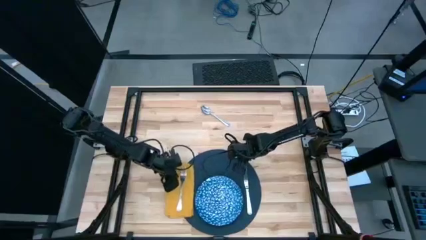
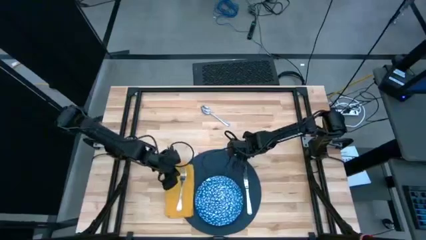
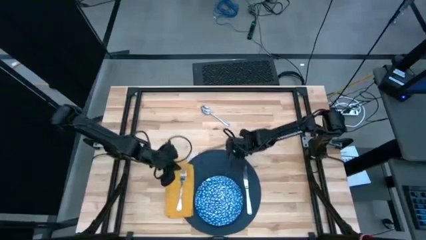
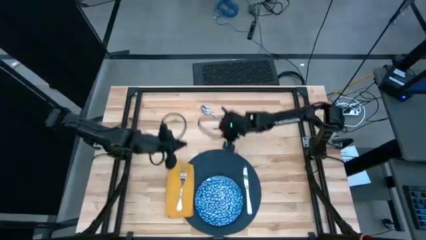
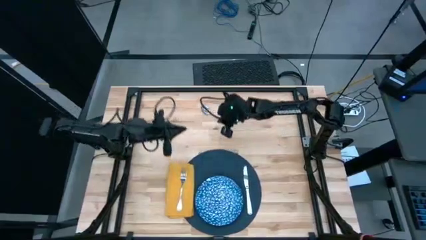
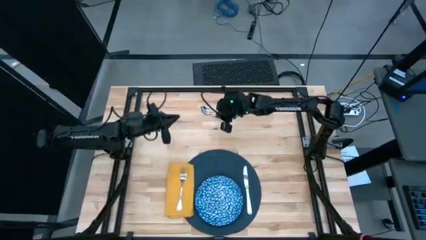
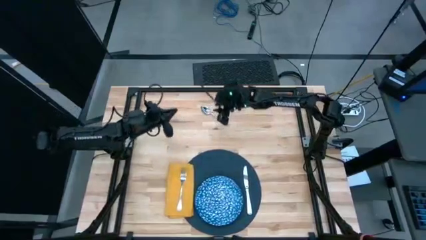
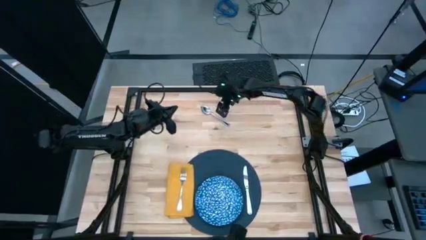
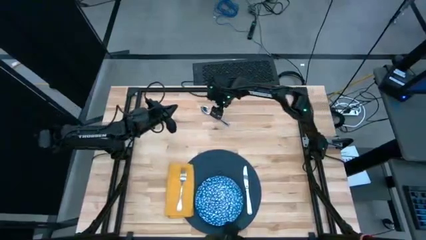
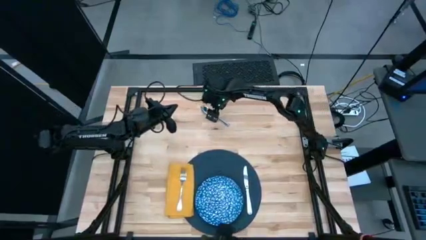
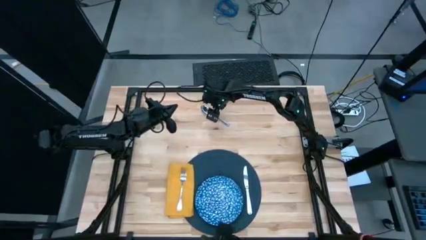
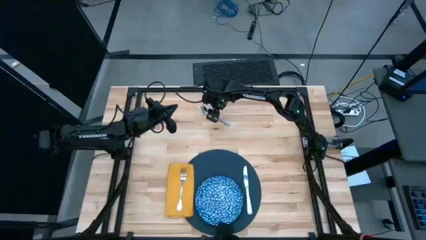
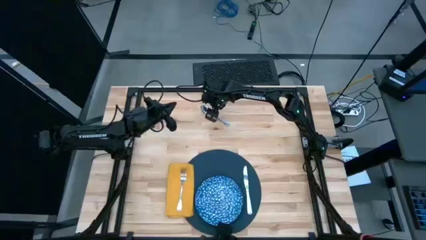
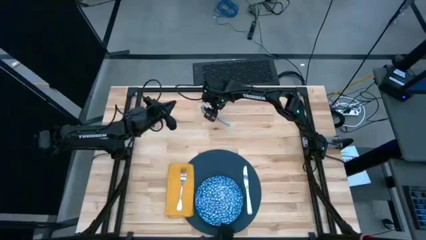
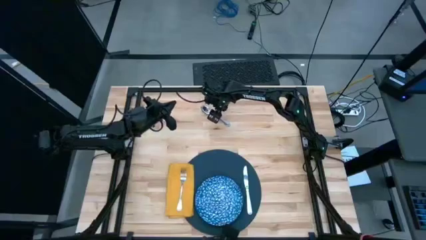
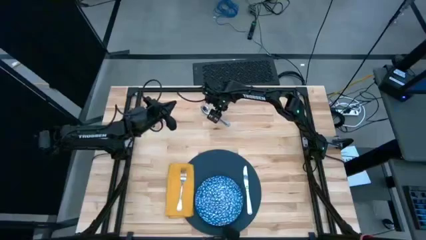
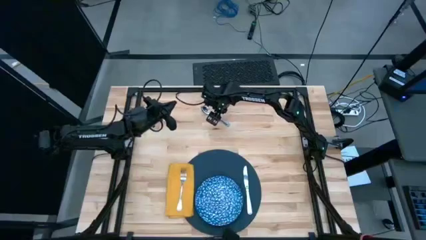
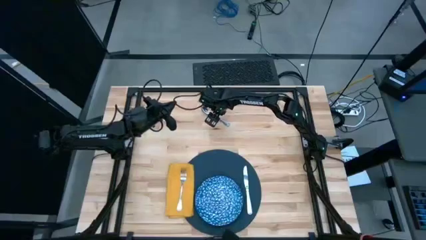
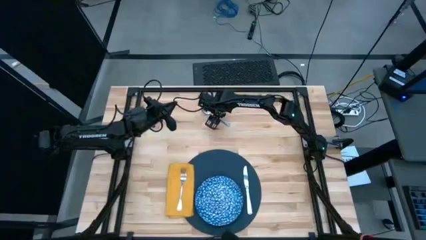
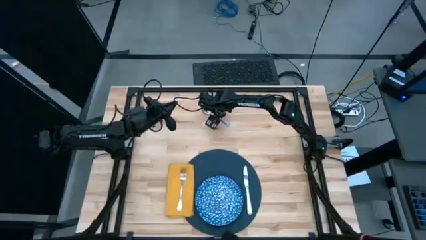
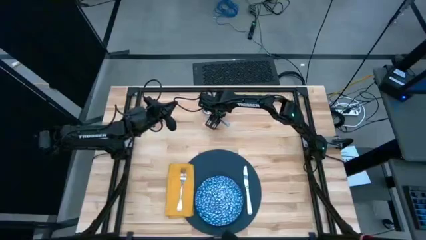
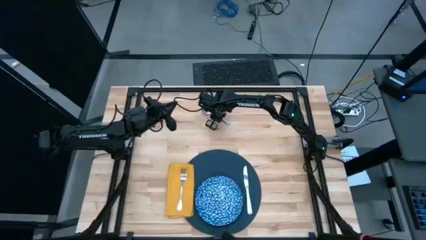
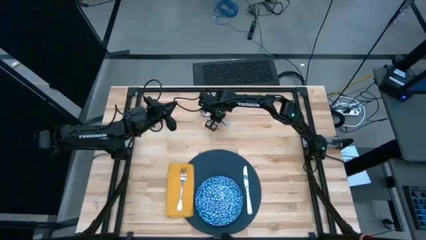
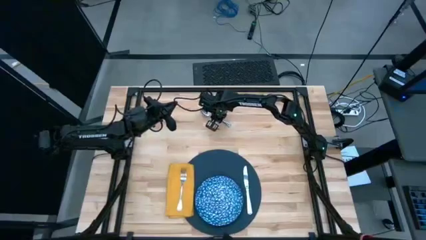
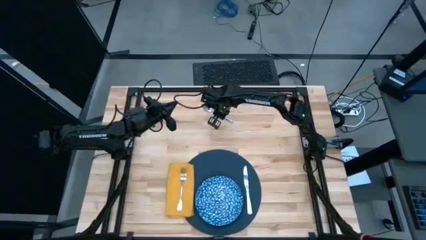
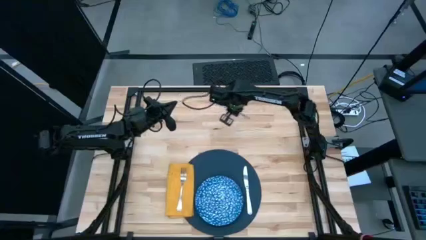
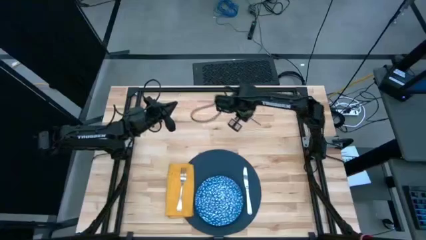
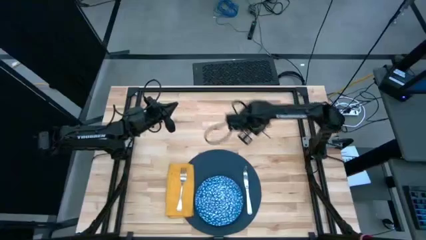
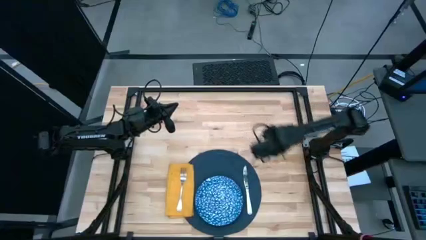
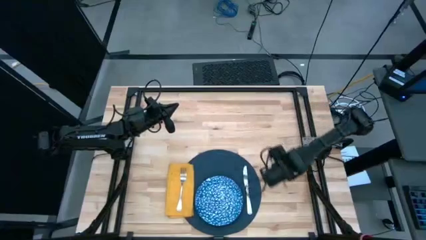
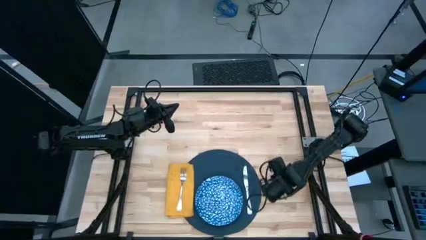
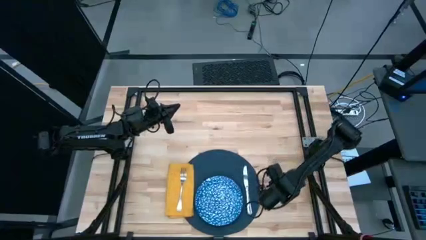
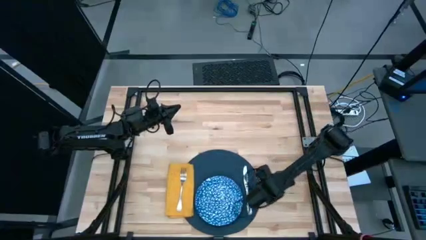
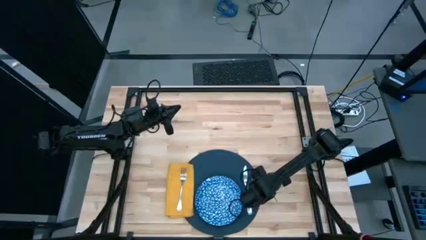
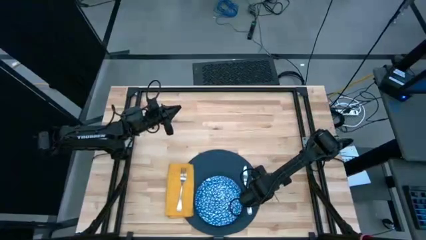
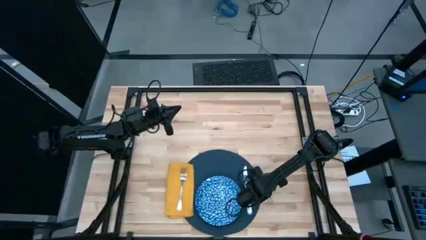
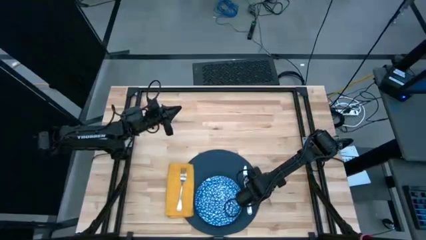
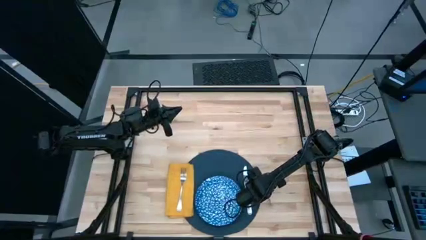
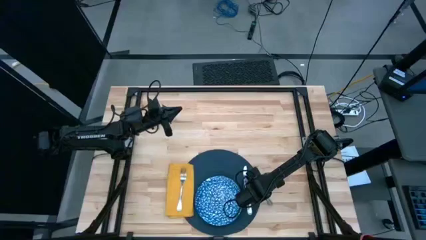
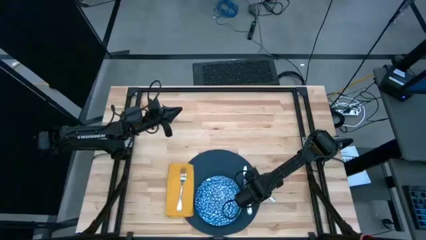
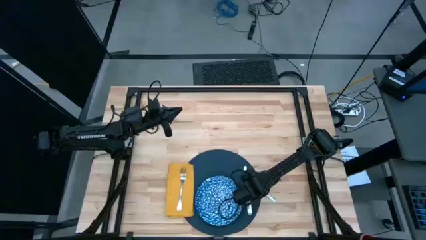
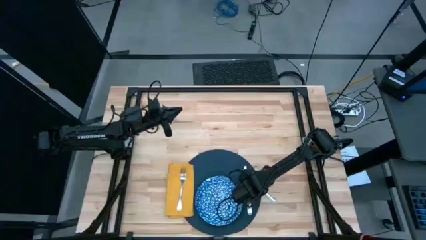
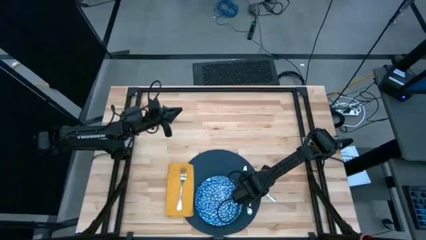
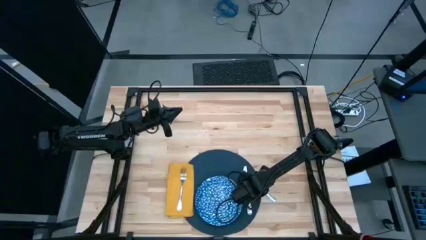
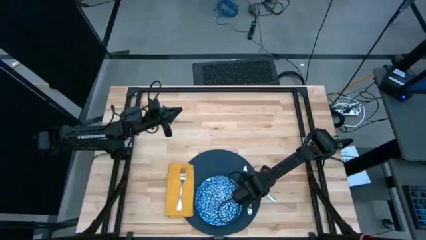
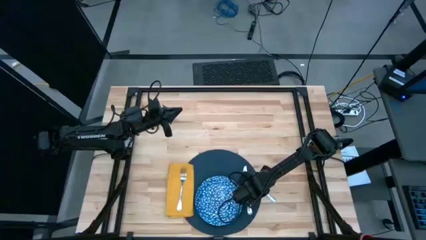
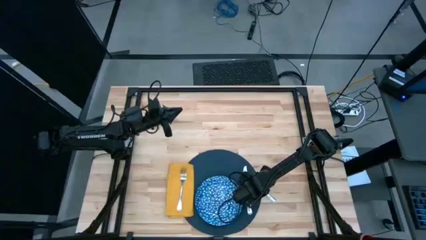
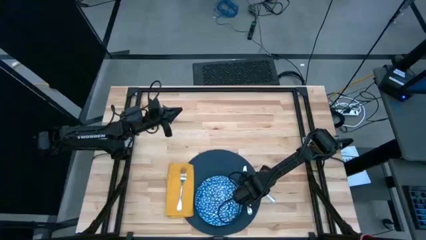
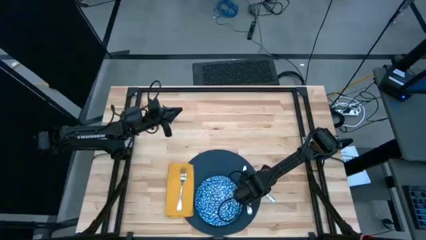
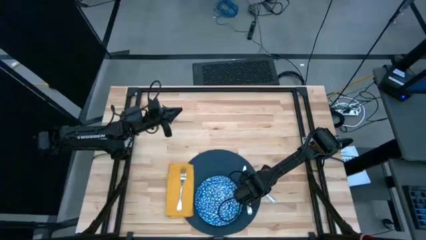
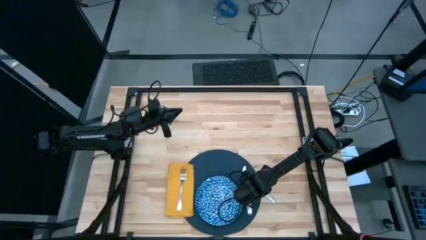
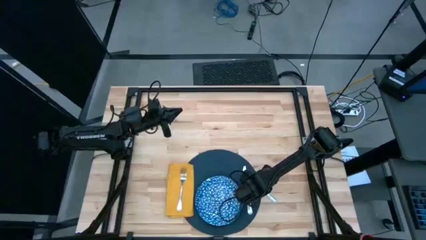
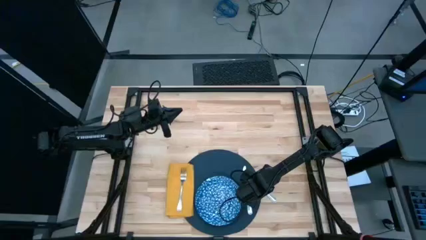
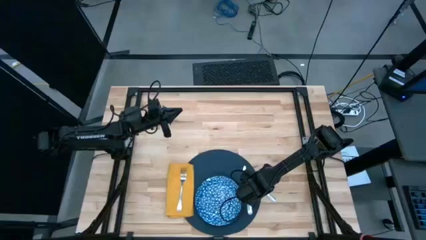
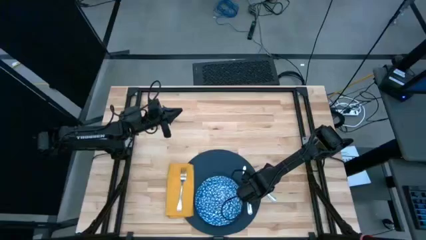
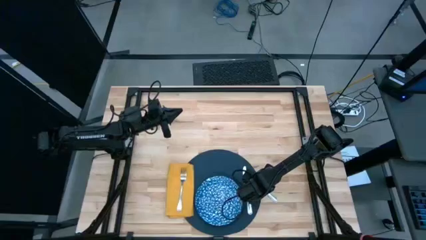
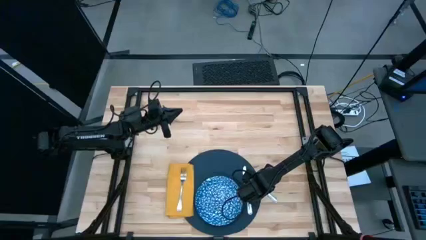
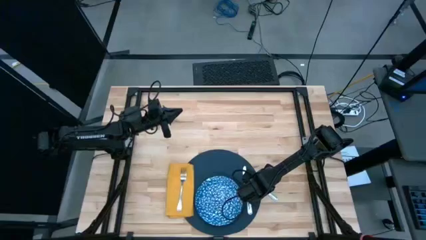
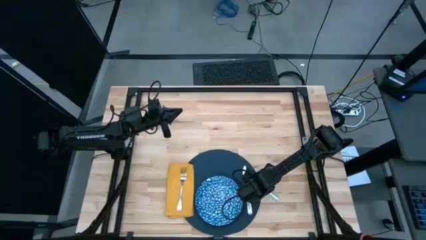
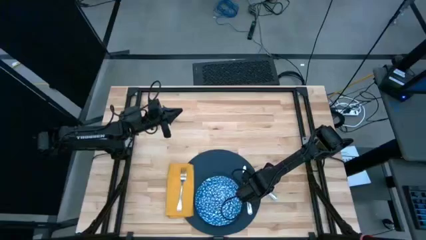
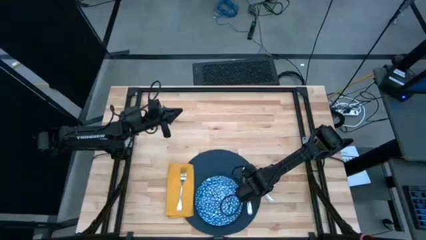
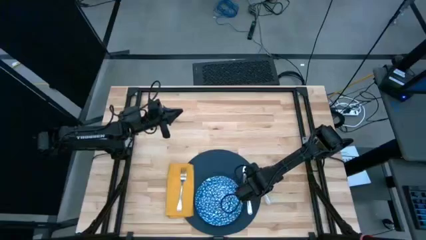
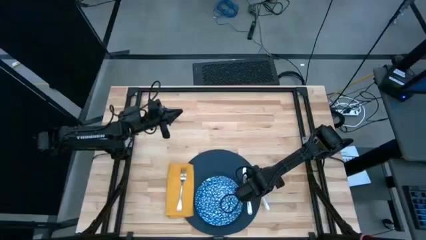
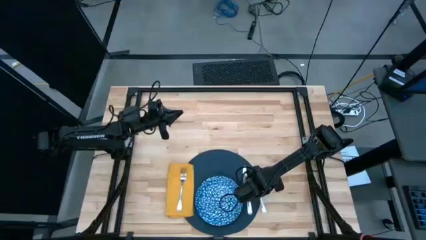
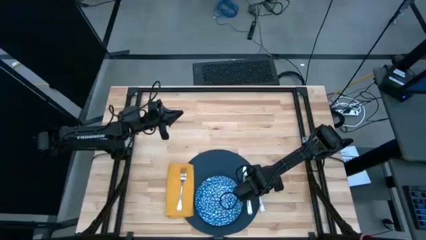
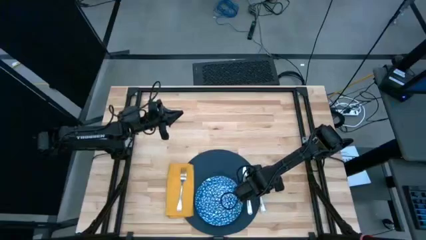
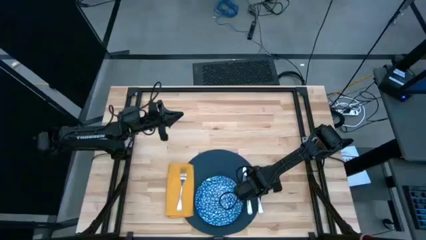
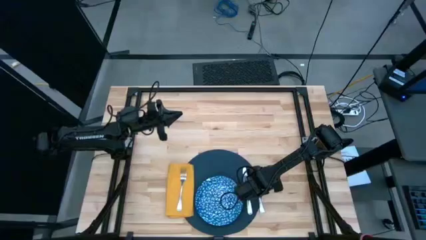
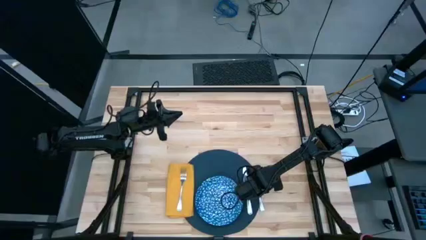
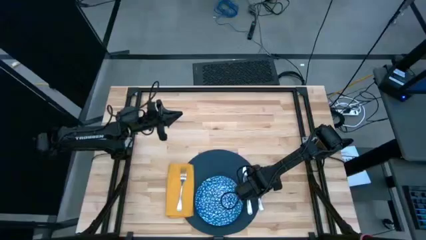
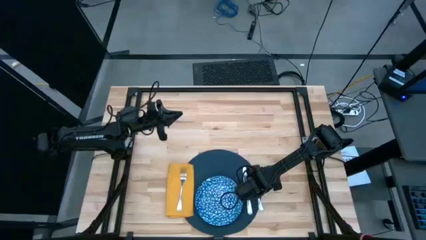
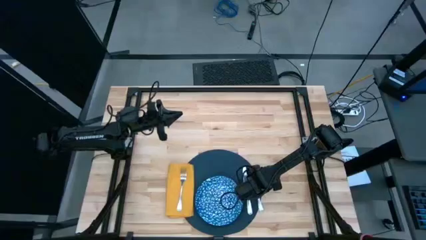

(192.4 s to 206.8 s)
Task: Set table place
Put the silver spoon on the blue table mat to the right of the silver table knife
